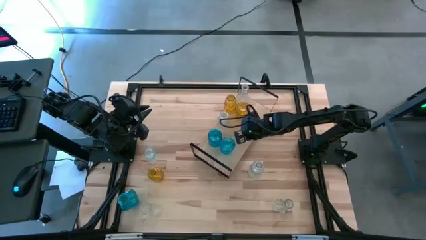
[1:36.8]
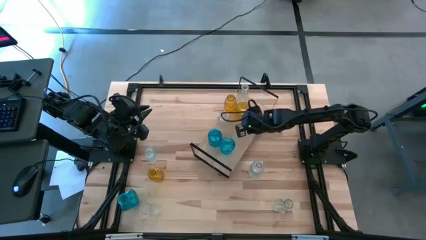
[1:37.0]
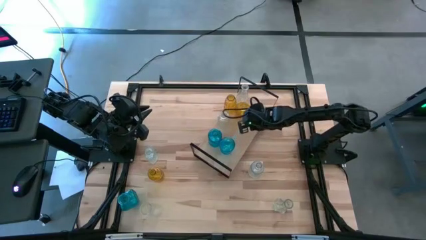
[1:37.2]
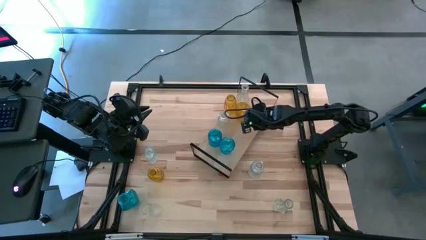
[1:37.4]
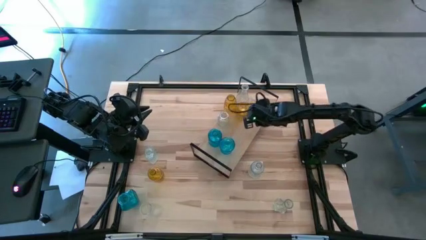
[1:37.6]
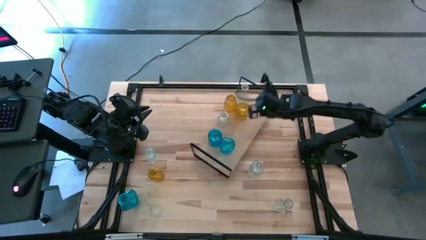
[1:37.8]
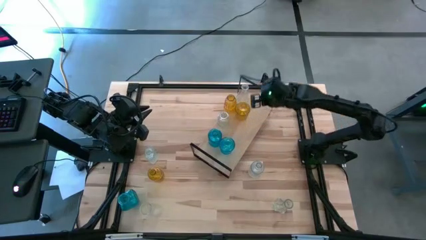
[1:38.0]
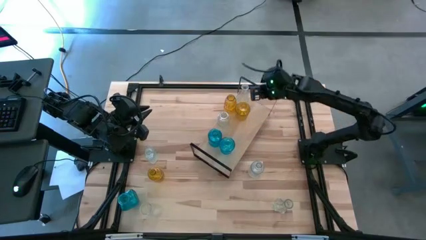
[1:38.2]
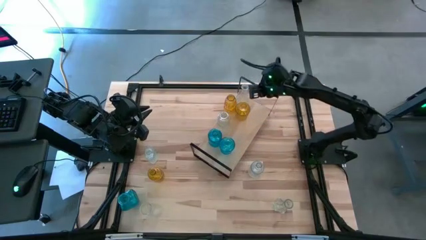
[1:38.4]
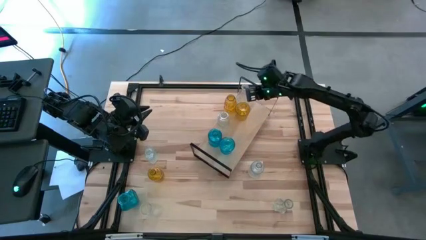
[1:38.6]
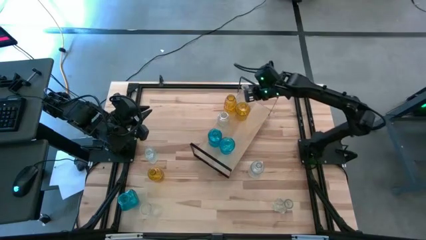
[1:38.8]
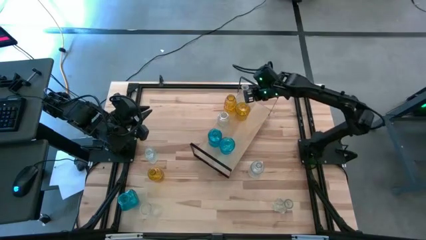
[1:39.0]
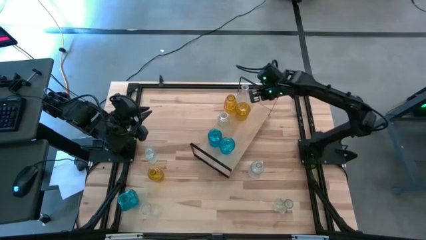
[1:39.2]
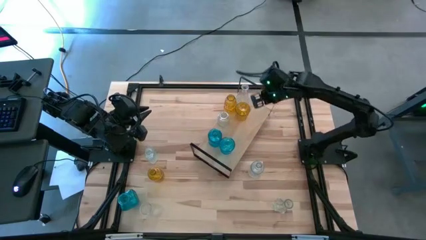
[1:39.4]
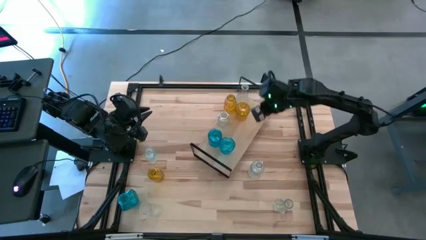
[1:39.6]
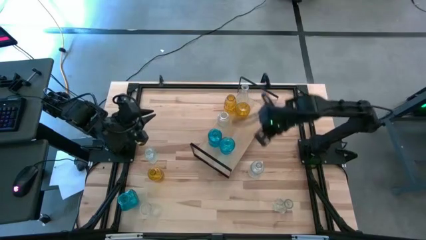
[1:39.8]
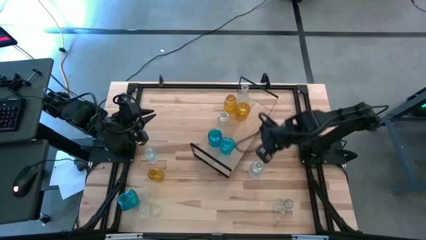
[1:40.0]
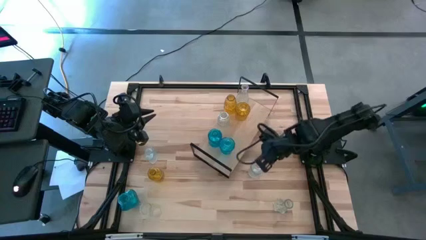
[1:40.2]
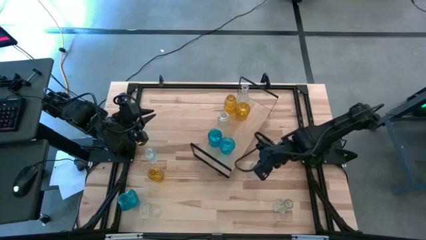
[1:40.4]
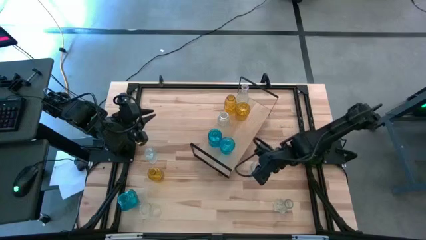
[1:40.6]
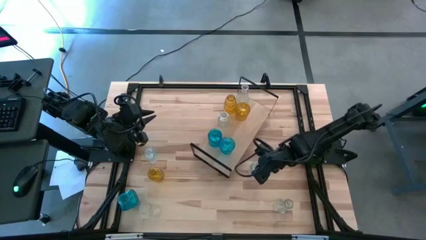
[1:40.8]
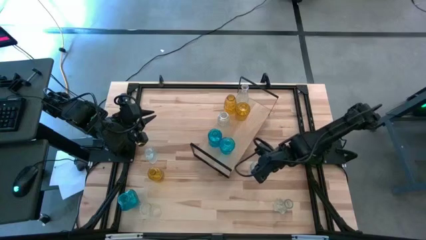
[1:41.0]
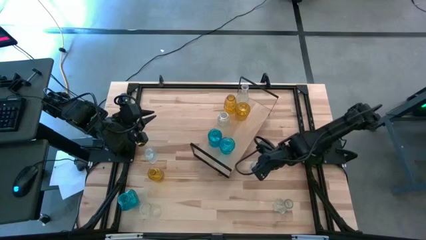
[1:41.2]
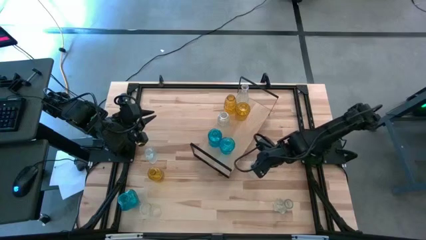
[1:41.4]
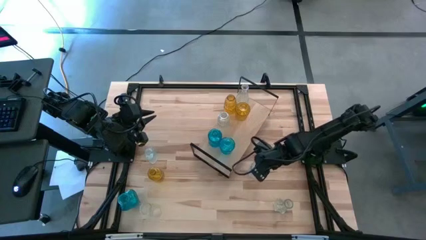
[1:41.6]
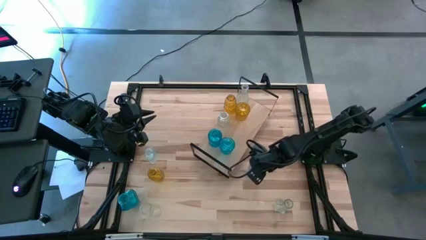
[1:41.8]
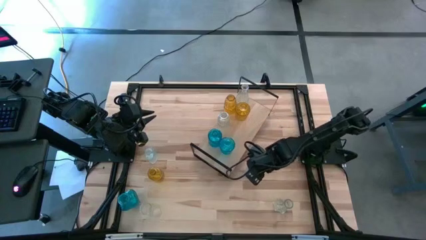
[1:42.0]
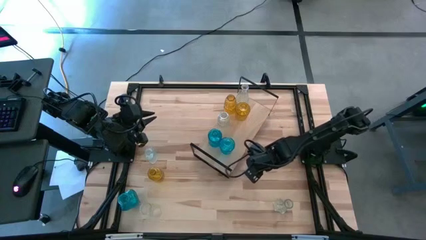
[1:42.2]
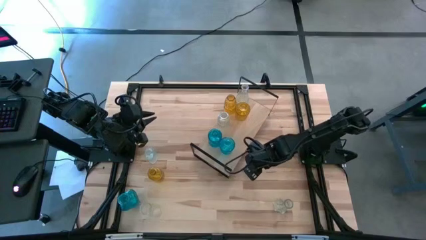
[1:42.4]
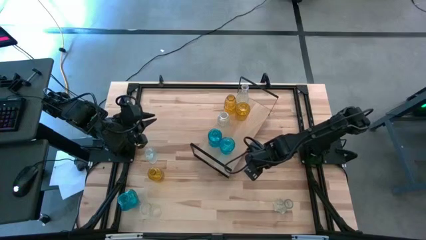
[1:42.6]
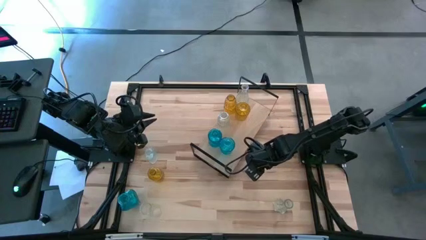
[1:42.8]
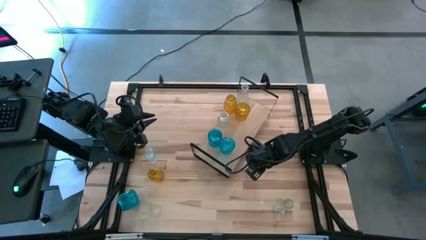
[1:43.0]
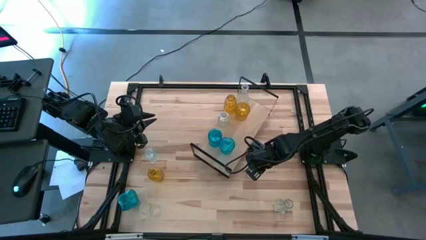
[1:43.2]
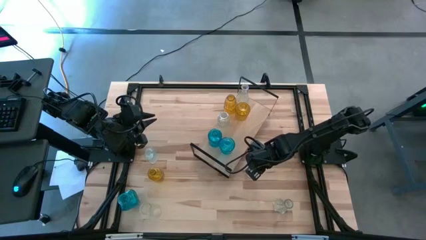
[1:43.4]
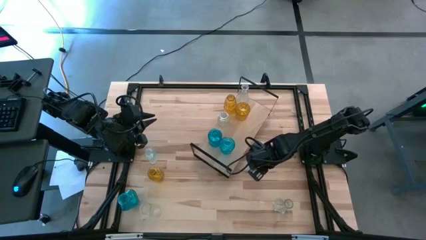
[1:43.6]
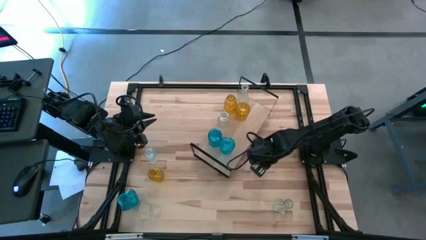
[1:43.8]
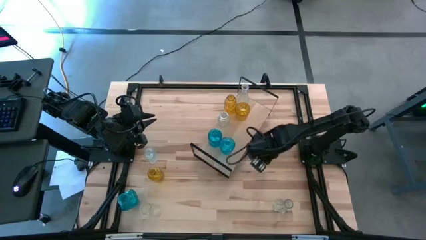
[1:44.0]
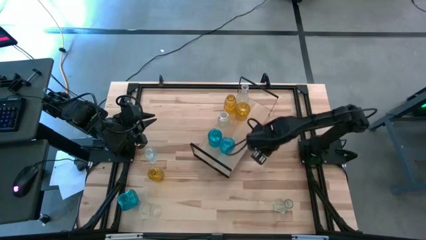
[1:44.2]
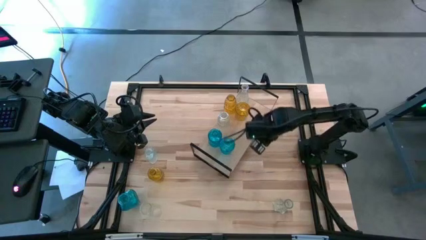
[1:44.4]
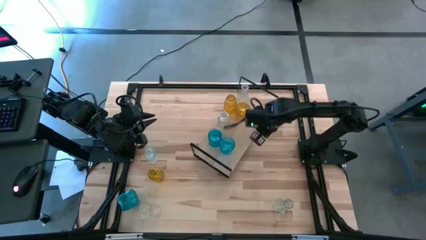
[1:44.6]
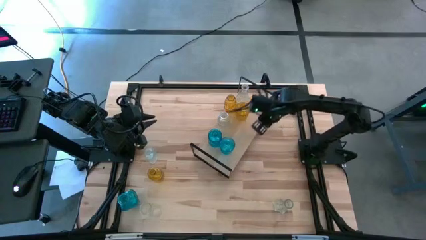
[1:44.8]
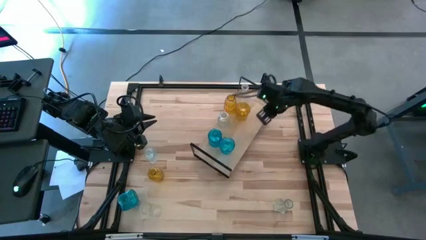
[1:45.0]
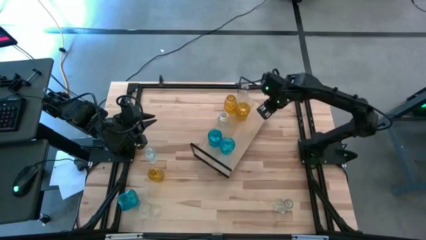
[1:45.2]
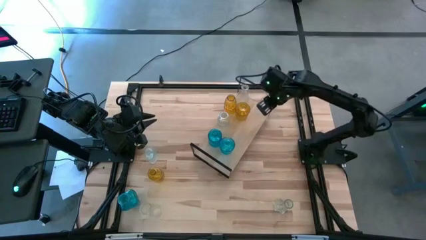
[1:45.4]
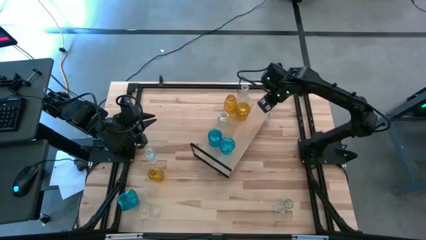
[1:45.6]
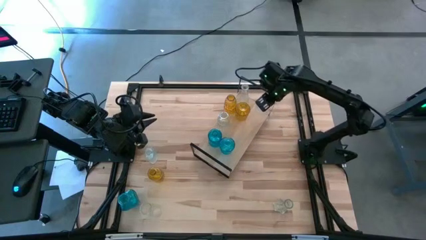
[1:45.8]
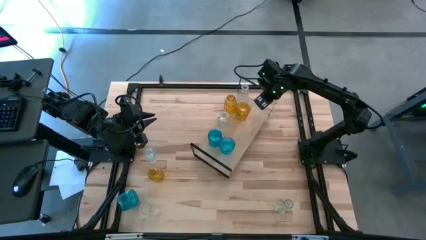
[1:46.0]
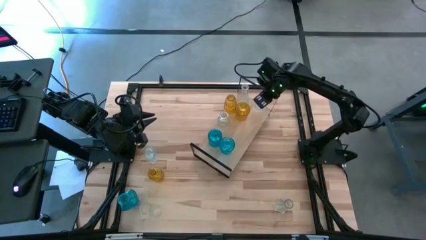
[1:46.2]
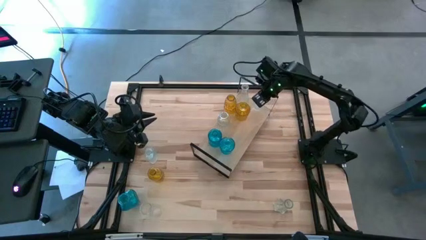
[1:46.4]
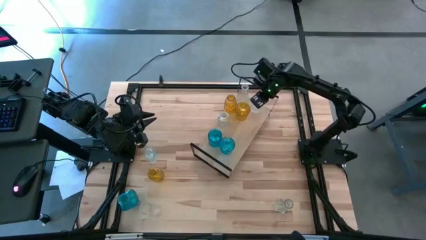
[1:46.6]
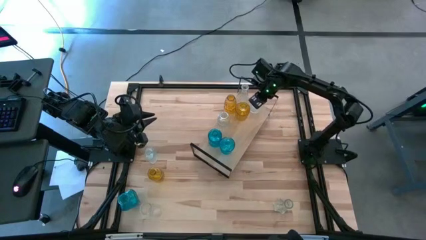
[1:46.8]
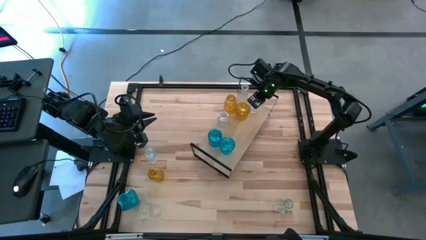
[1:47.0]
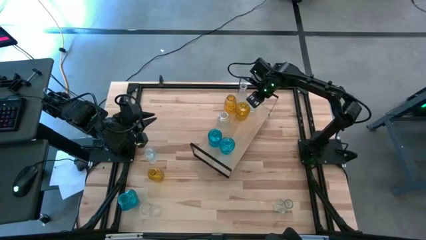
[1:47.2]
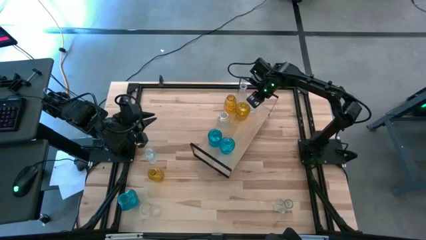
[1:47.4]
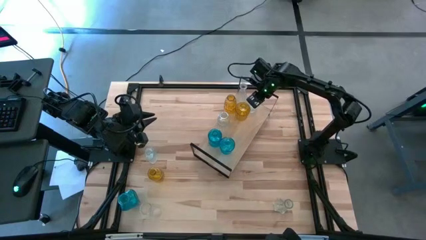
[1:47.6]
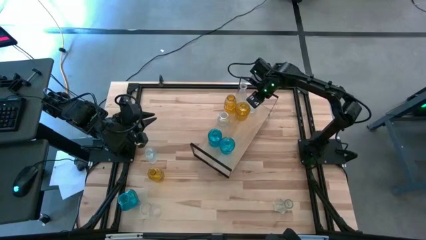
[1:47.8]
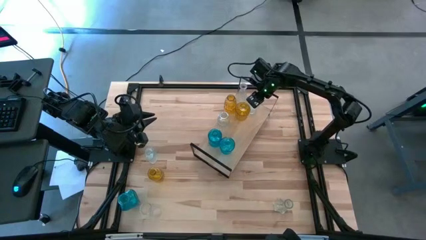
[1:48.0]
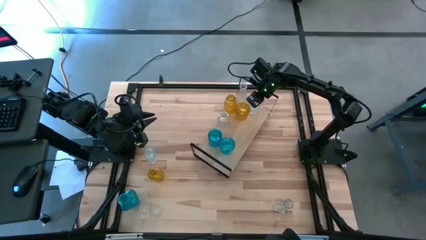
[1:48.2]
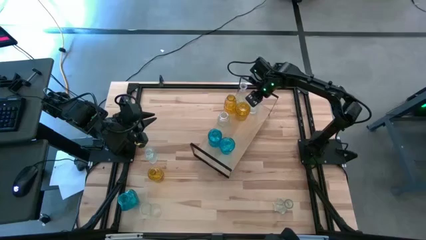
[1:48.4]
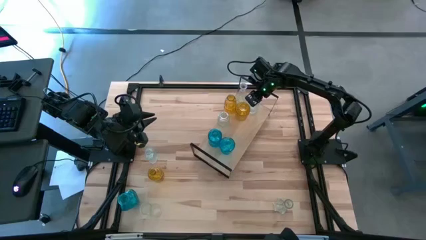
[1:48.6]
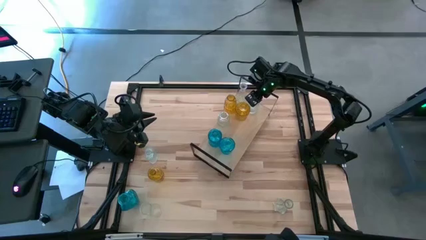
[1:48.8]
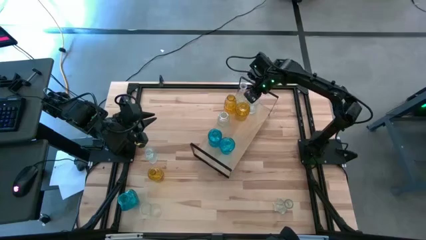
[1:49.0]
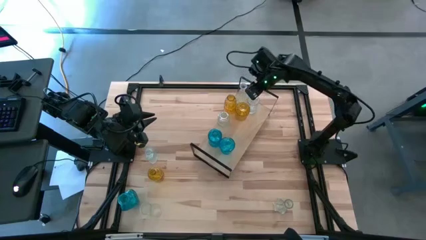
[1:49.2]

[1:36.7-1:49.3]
Task: sort vases onto shelf
Put the middle top transparent vase on the shelf and align with the other transparent vase
